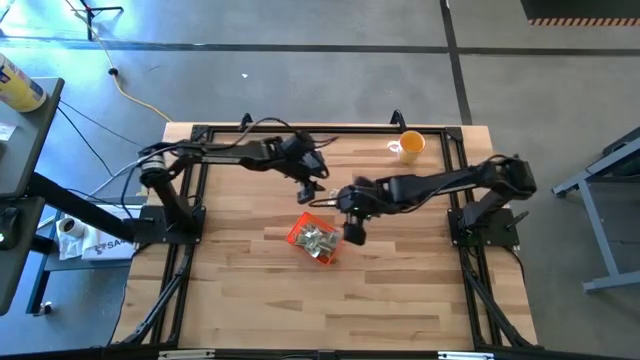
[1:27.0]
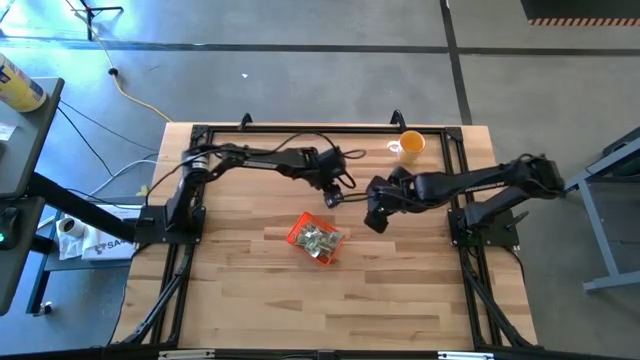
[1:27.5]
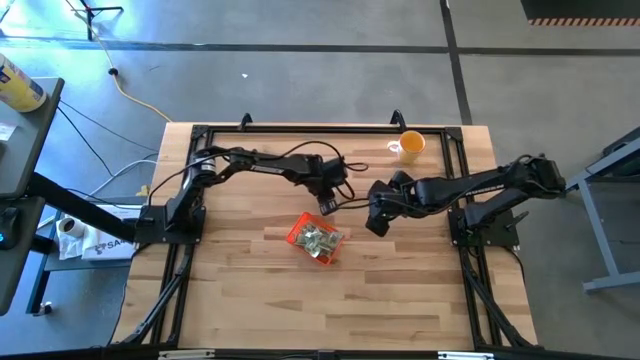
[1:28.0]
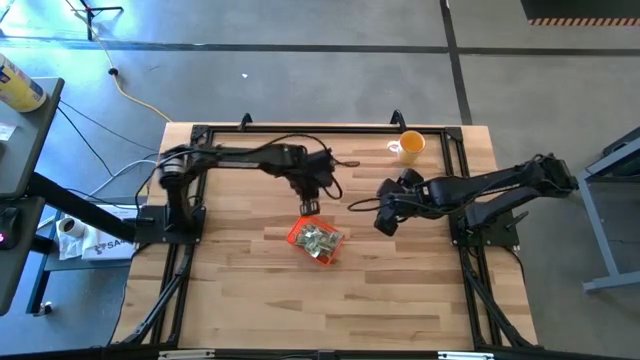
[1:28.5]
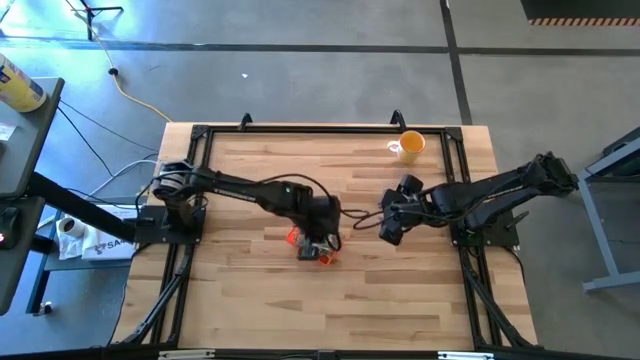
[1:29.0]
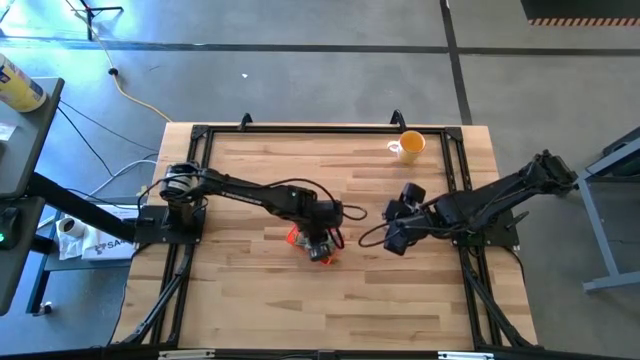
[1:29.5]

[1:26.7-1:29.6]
Task: Pick and place Stevia / Truvia into bins
Put the stevia packet into the orange bin

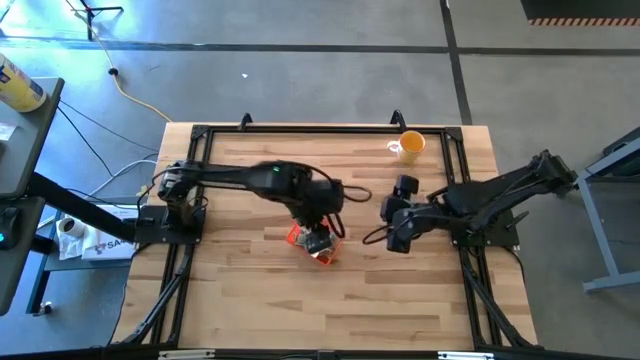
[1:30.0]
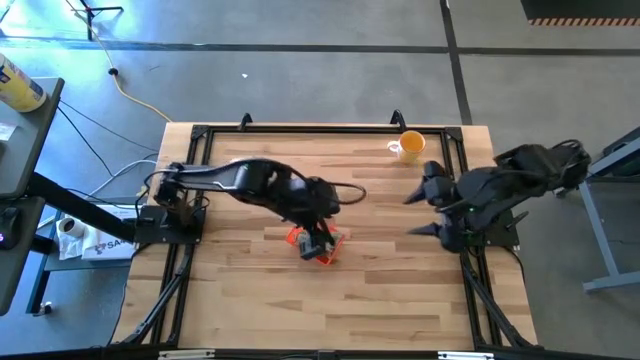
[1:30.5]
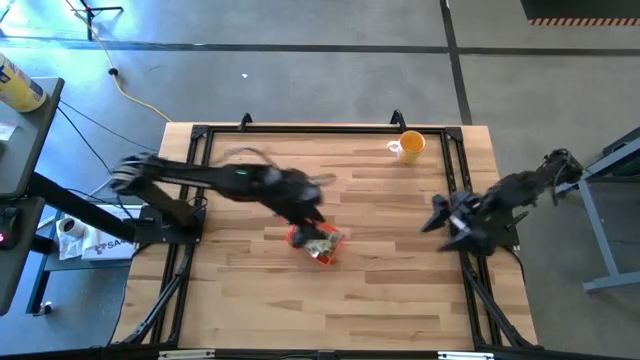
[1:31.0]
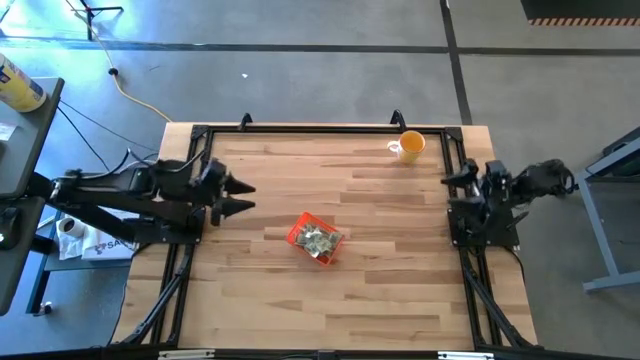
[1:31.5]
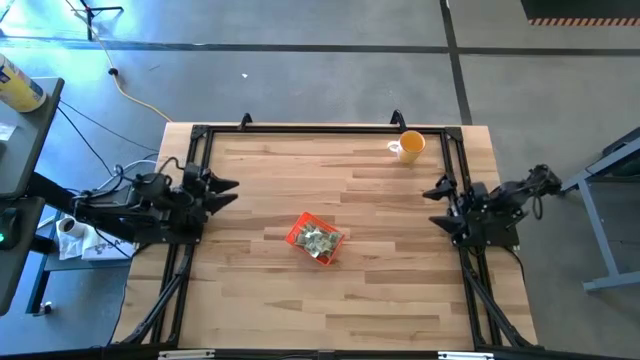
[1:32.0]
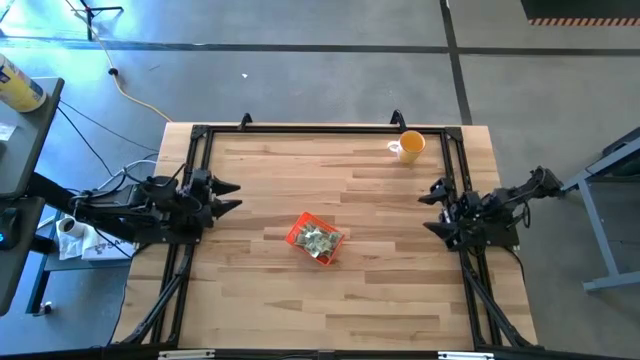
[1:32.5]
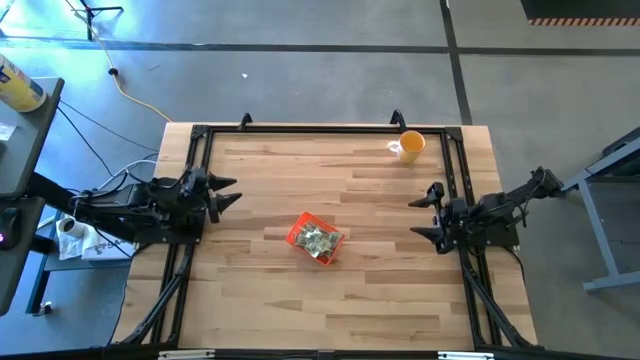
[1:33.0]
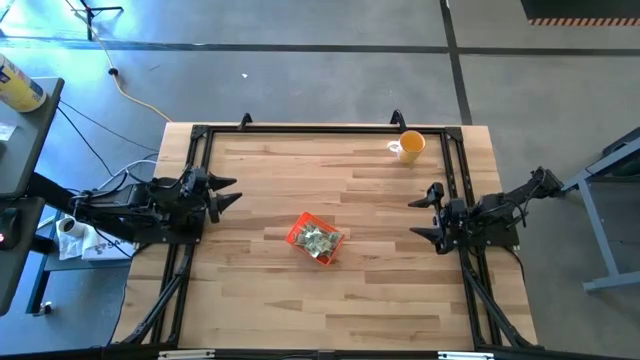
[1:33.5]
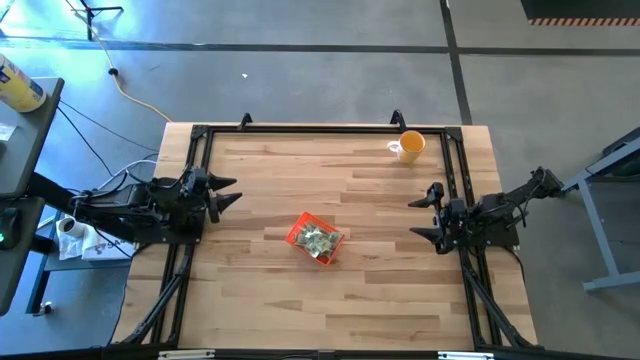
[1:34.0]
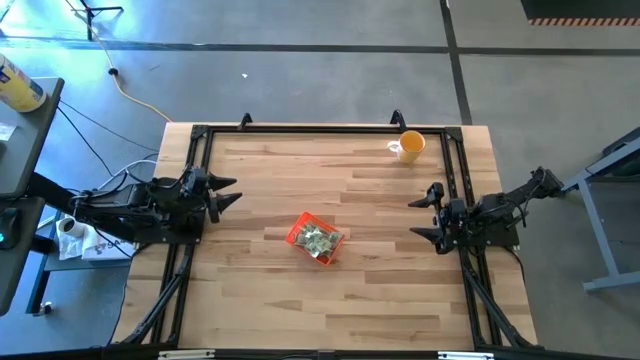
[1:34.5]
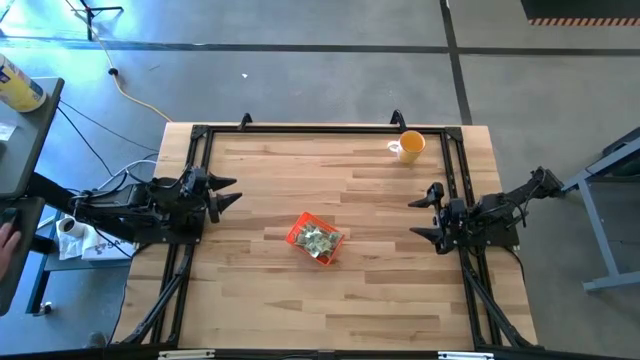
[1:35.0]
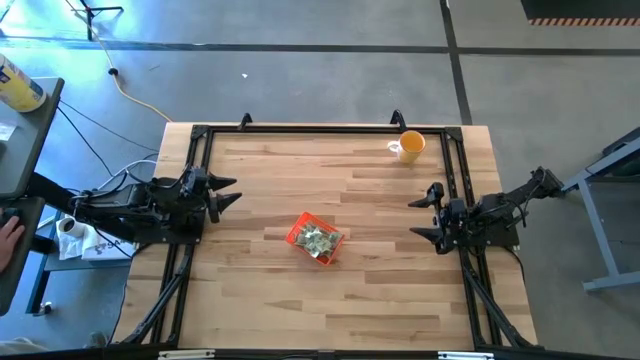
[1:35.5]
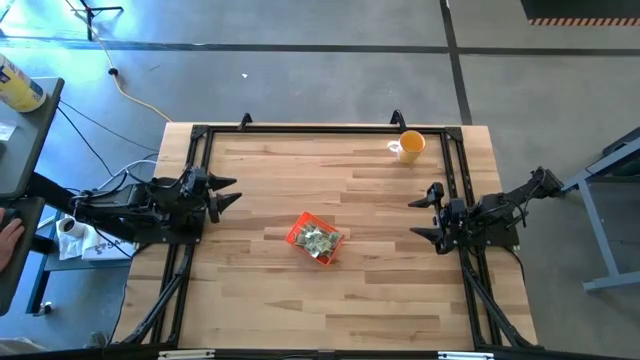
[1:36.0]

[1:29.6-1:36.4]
Return to Home Position

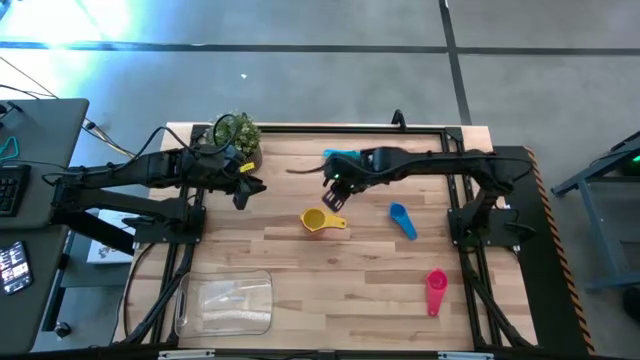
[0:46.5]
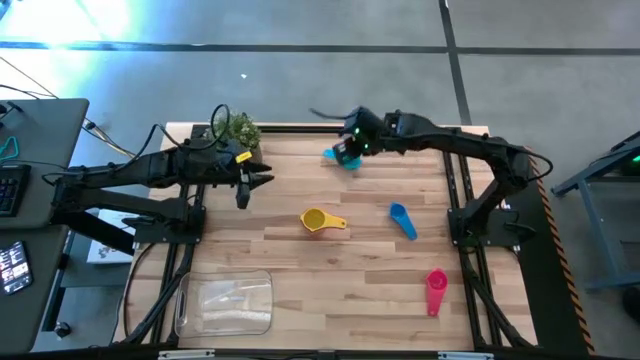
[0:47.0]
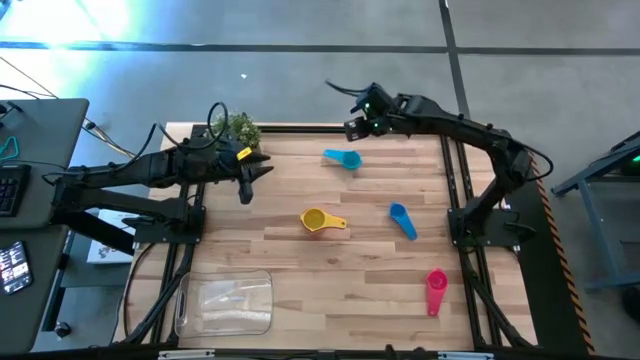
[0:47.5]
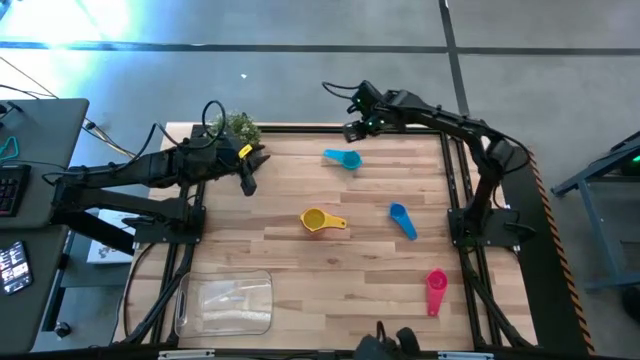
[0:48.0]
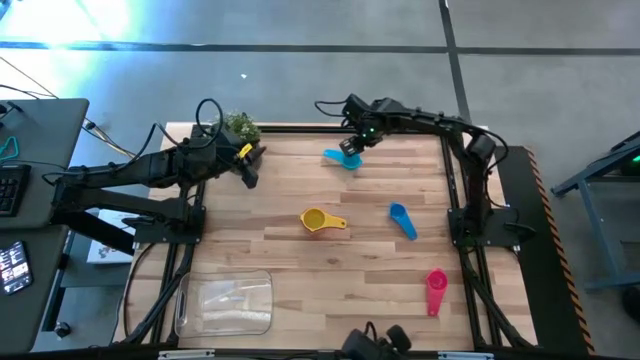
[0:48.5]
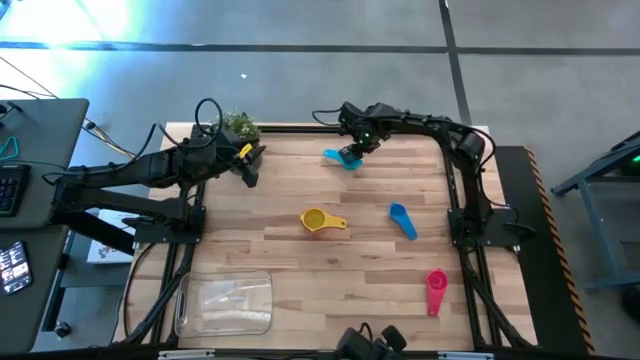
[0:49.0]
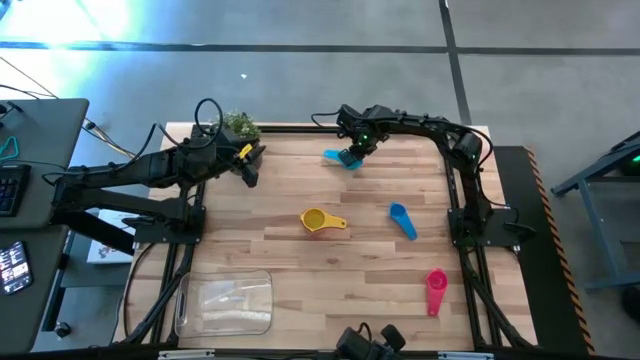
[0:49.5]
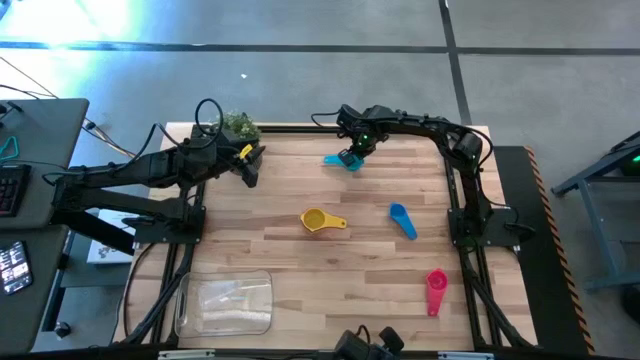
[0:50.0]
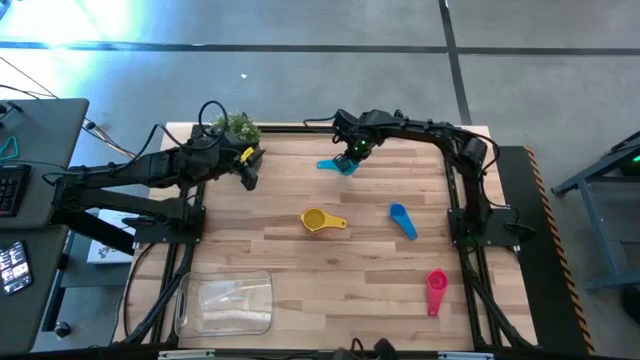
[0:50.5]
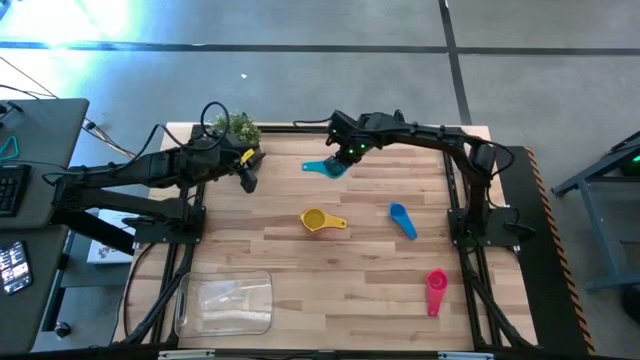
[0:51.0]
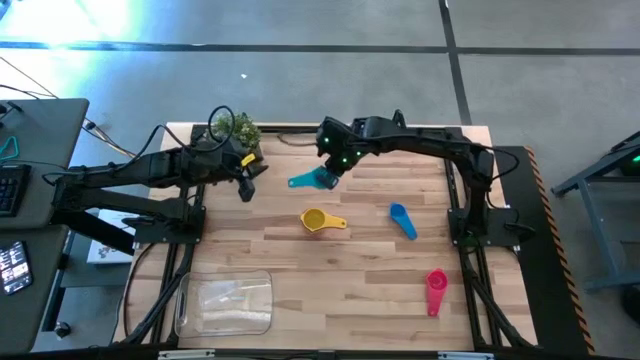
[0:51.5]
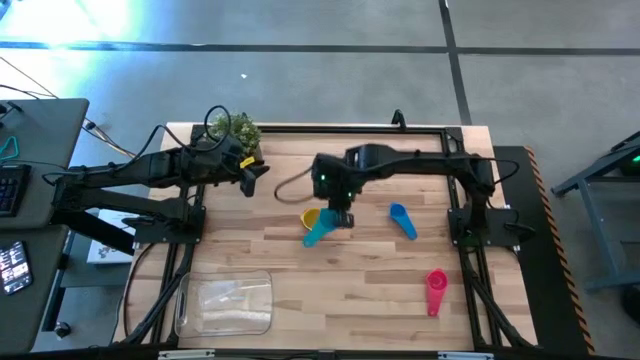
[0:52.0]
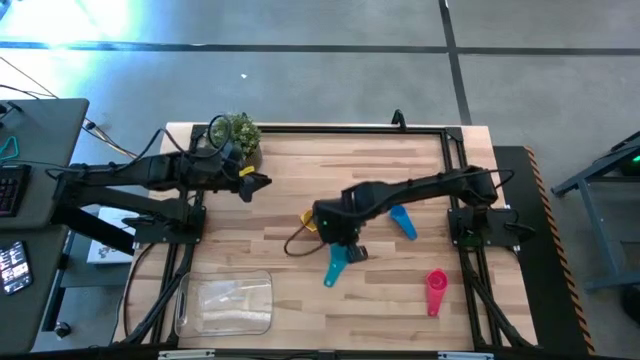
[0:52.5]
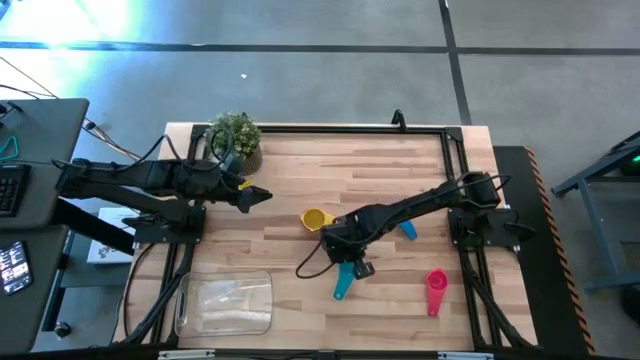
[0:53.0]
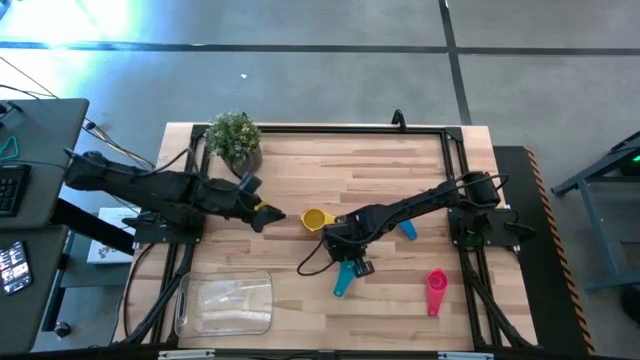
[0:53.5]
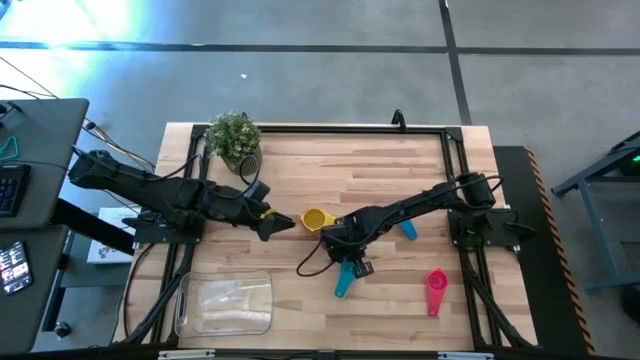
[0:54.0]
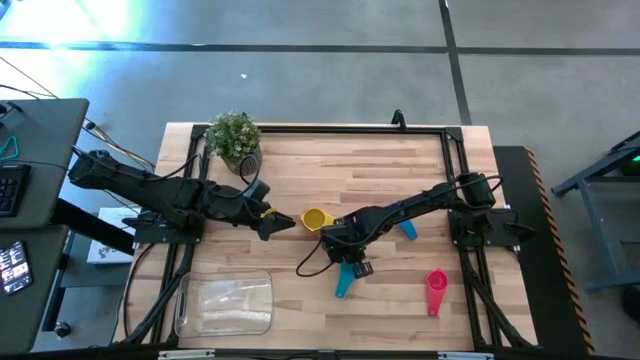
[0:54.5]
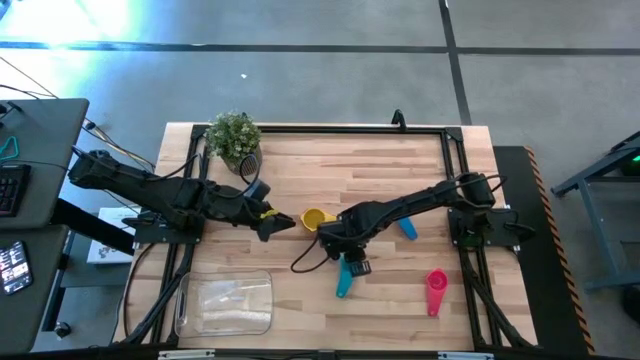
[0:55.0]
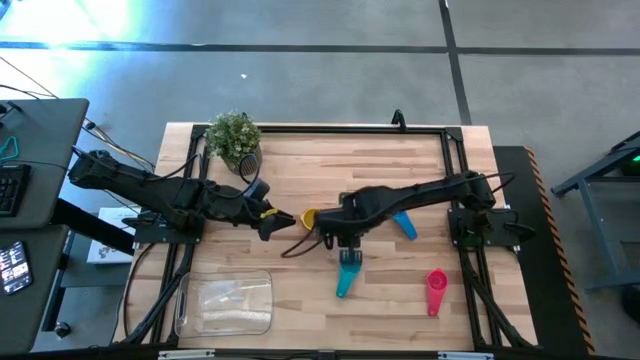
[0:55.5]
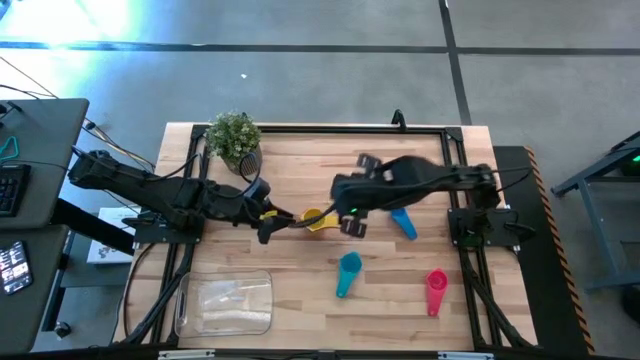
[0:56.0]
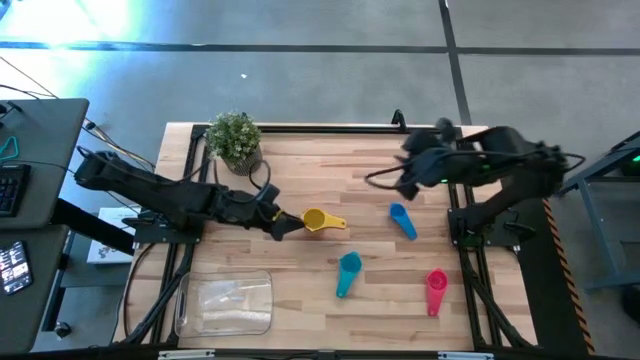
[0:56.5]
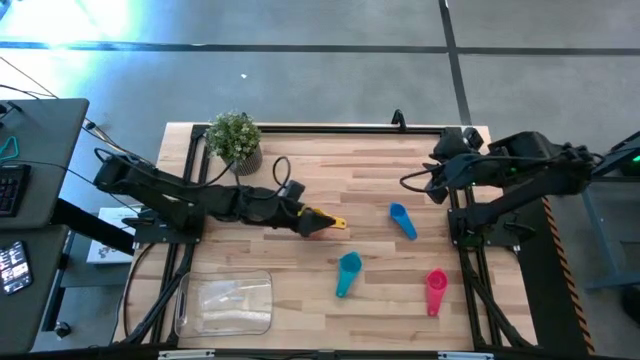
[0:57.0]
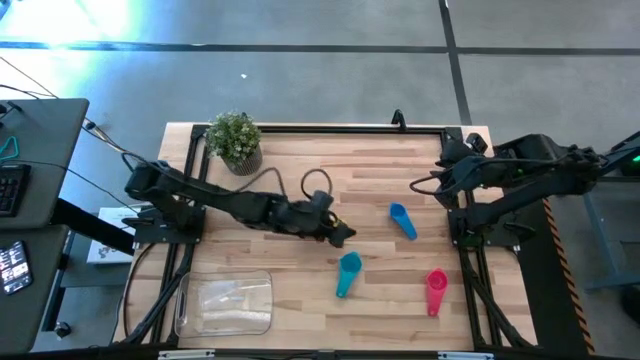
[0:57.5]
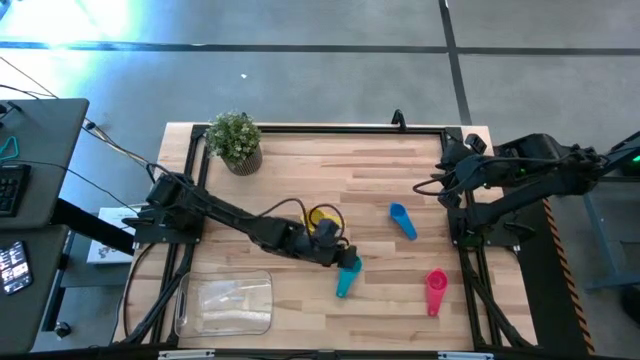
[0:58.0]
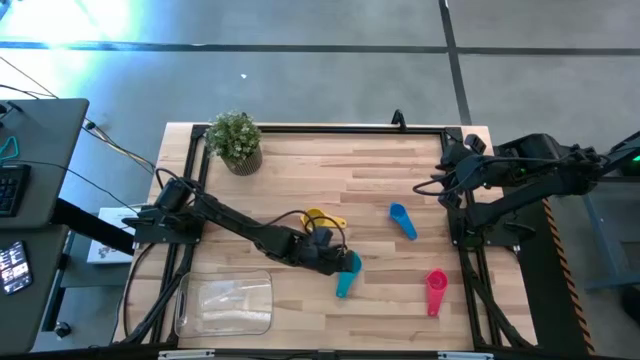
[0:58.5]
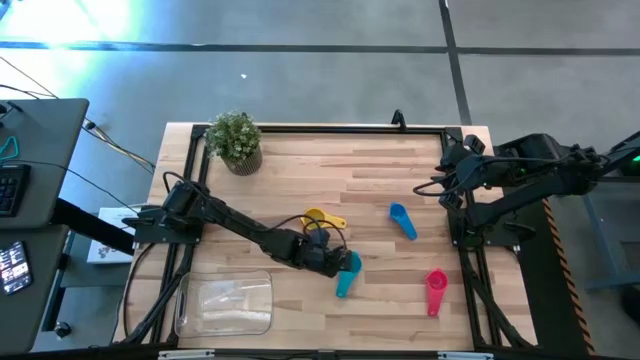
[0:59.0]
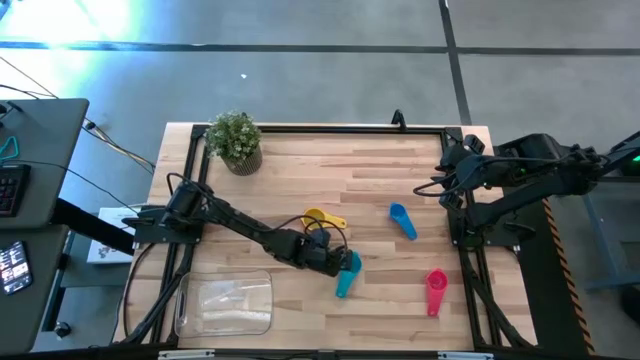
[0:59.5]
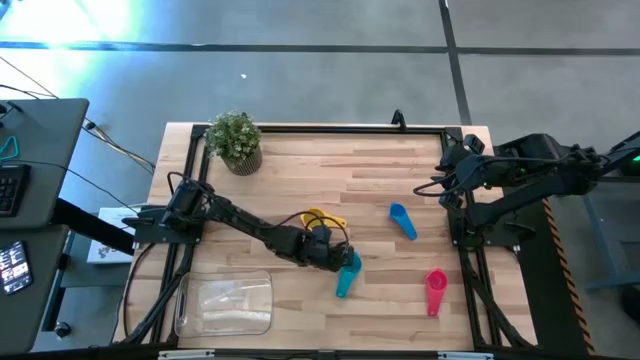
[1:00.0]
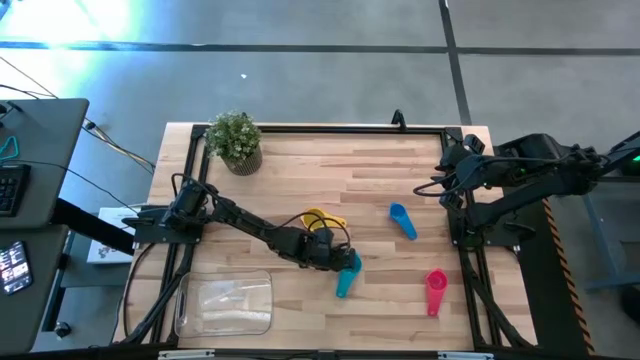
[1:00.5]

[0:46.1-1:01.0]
Task: Nest measuring cups in basket
Stack the light blue measuring cup on the yellow measuring cup
